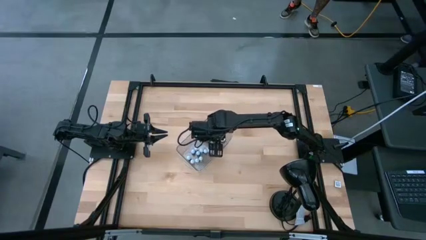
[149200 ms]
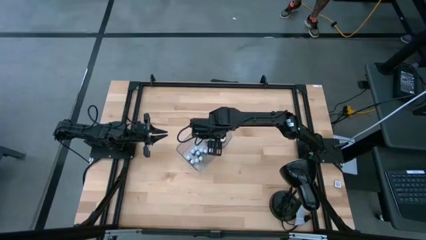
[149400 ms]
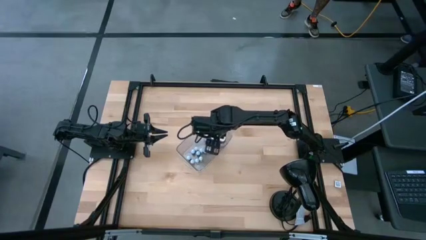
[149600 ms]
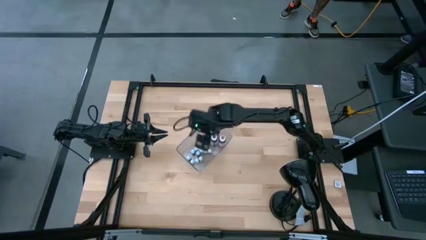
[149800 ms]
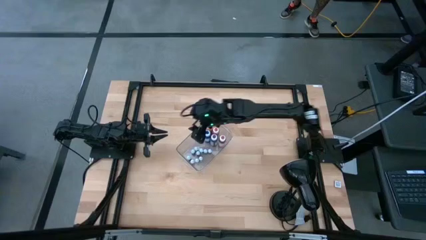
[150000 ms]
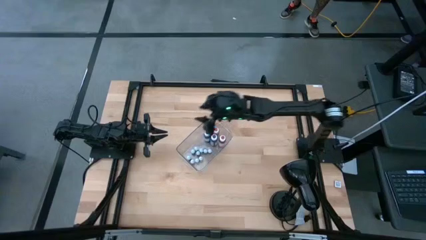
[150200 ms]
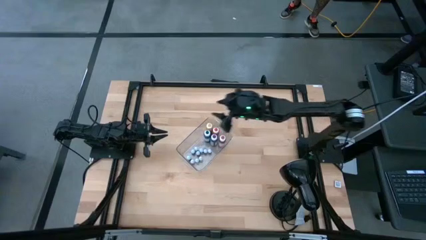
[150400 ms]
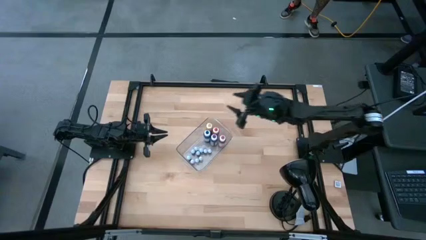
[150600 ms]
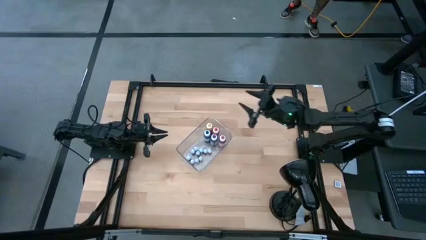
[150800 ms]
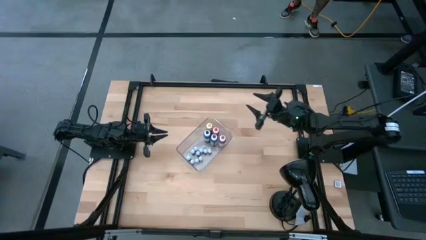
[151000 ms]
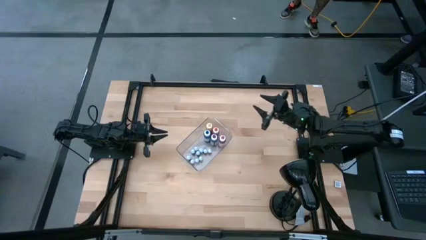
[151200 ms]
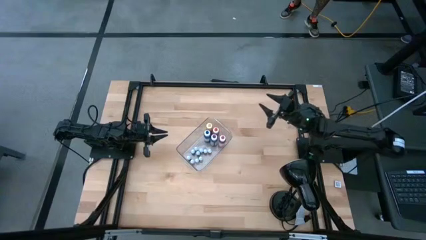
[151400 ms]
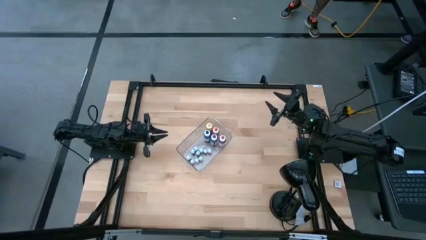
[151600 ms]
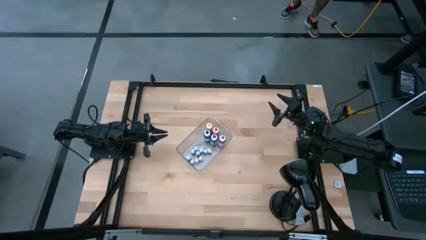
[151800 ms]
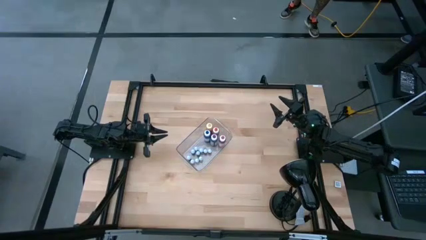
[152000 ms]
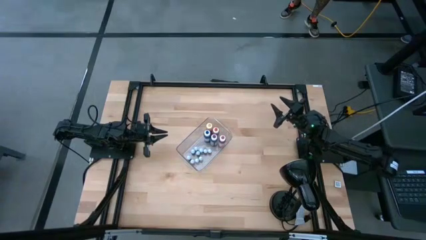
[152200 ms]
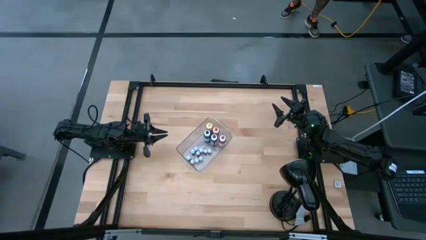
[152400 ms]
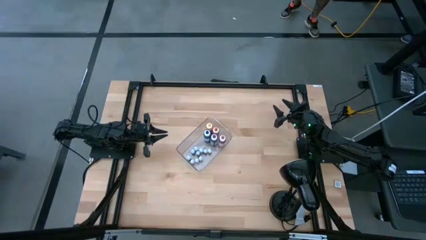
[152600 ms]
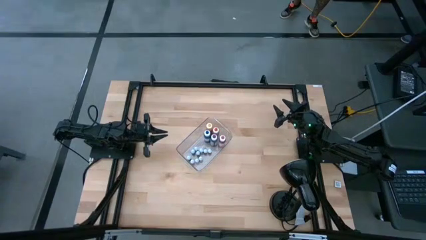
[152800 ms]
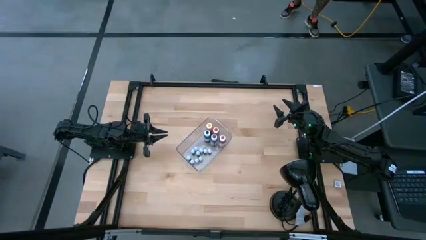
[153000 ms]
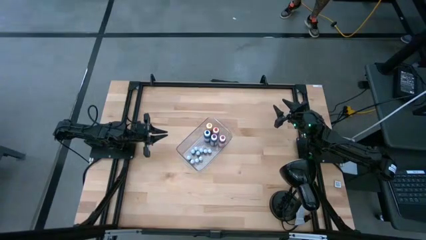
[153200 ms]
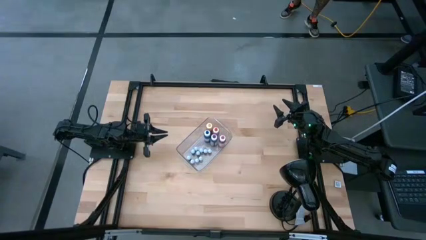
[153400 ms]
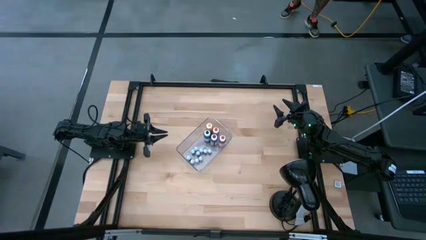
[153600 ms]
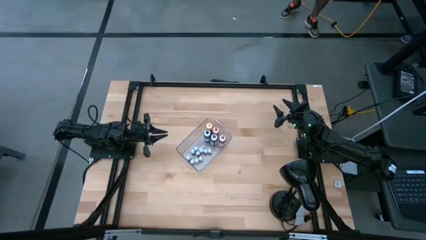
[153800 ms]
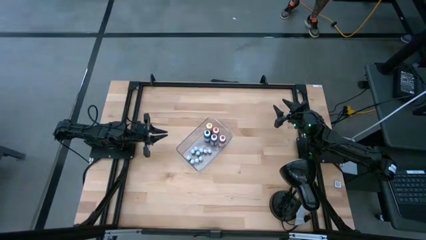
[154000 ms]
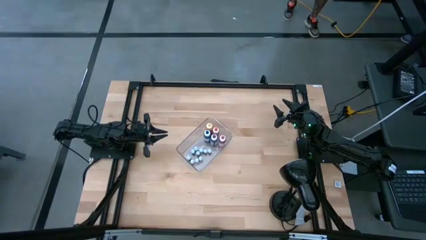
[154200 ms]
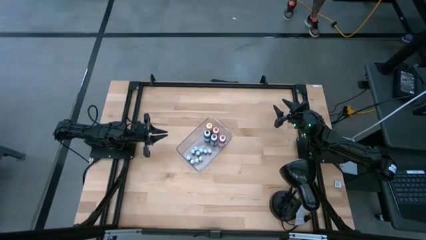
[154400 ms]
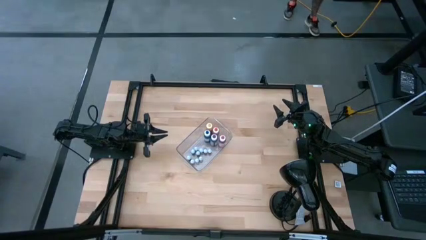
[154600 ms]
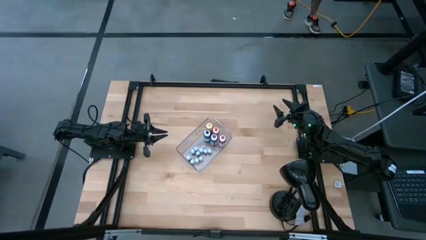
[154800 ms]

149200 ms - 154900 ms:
Task: Pick & Place food coloring
Return to Home Position

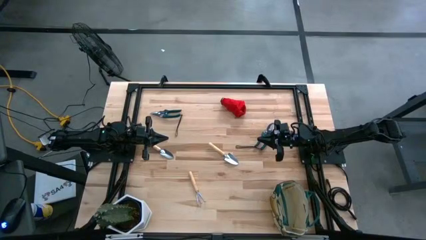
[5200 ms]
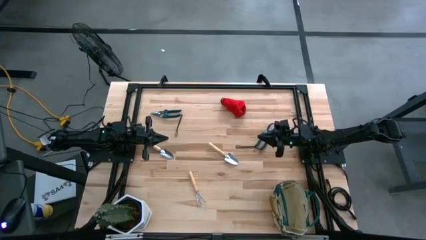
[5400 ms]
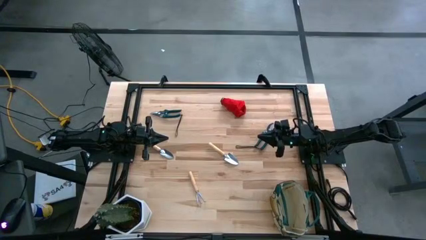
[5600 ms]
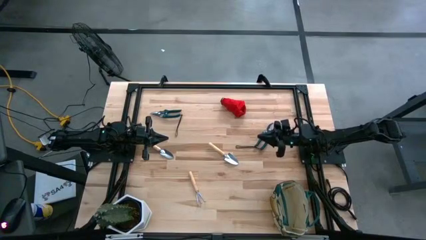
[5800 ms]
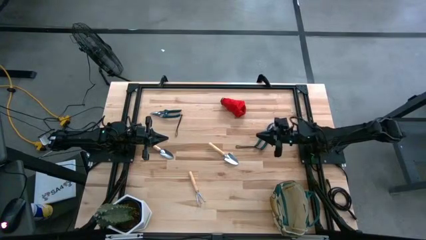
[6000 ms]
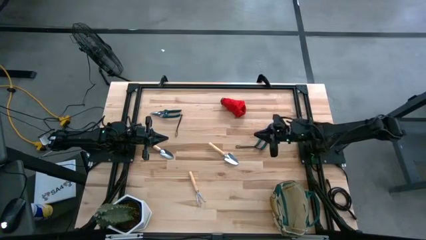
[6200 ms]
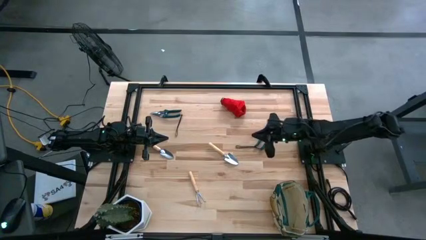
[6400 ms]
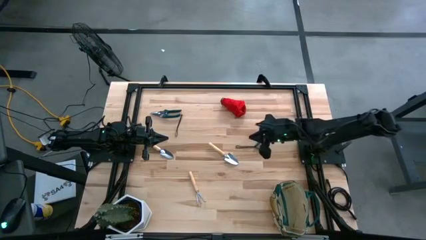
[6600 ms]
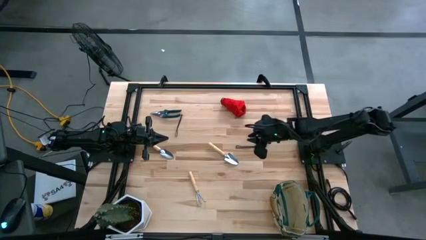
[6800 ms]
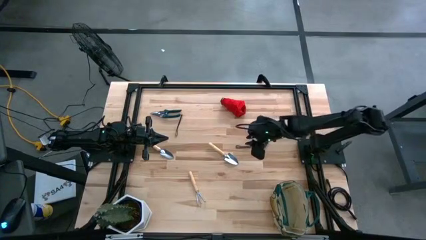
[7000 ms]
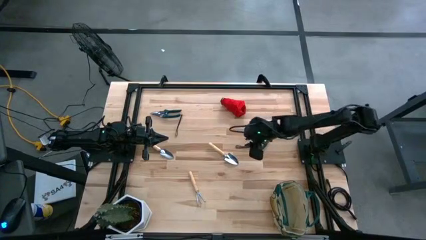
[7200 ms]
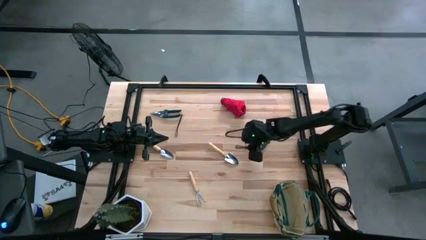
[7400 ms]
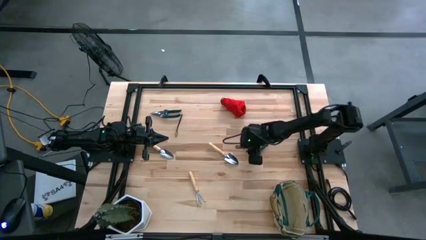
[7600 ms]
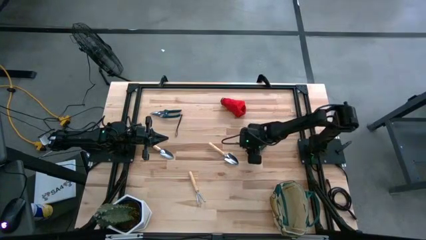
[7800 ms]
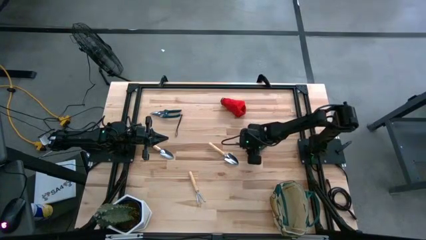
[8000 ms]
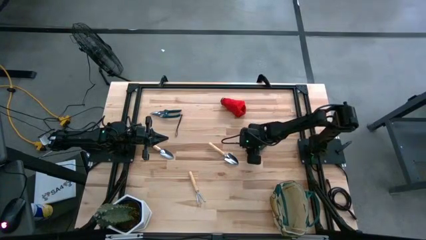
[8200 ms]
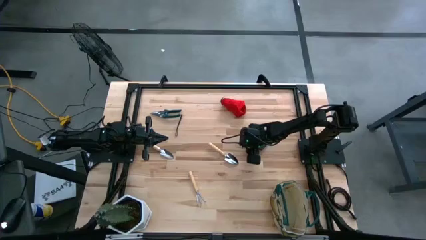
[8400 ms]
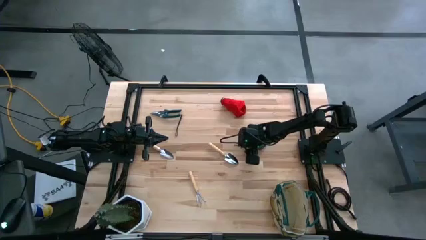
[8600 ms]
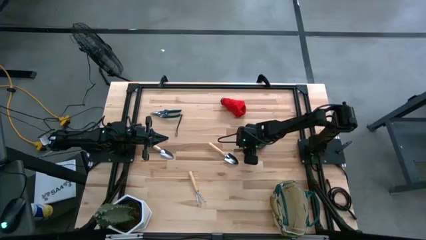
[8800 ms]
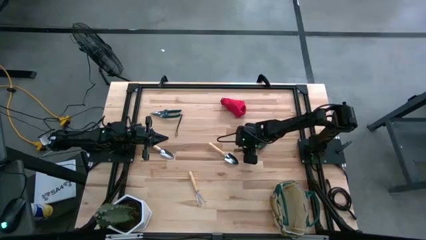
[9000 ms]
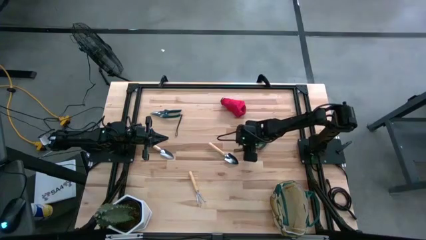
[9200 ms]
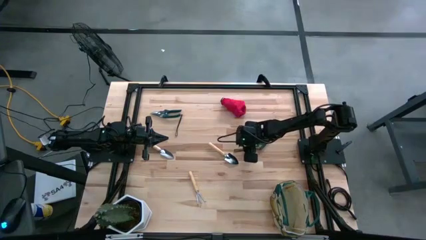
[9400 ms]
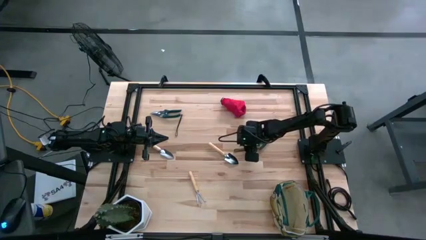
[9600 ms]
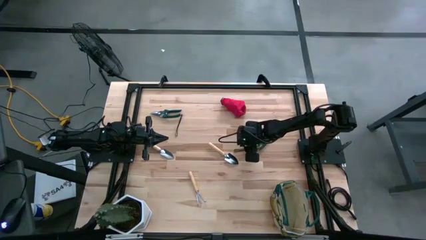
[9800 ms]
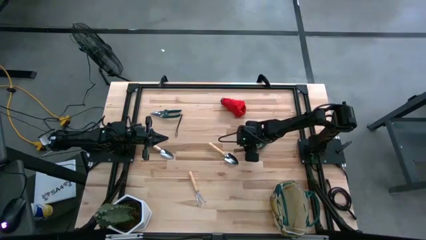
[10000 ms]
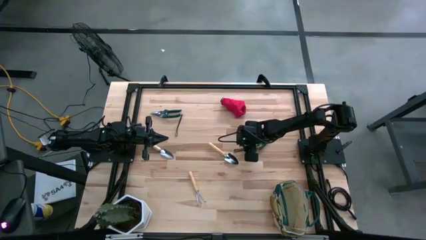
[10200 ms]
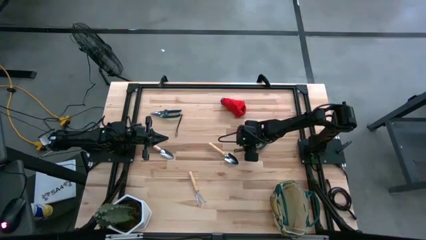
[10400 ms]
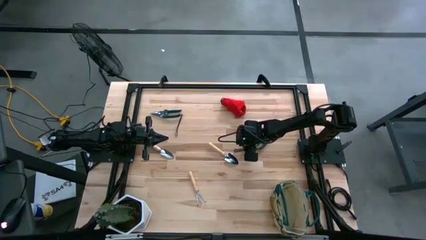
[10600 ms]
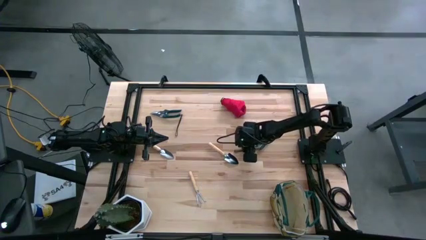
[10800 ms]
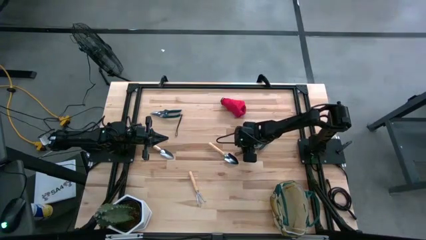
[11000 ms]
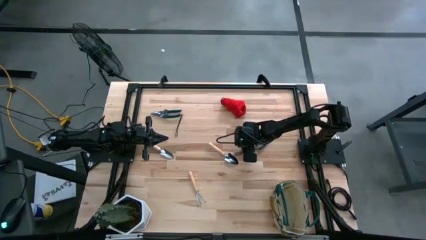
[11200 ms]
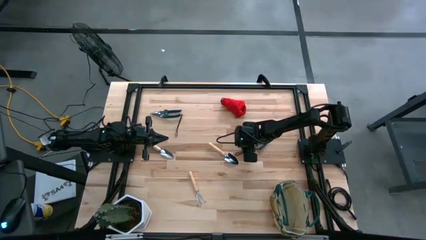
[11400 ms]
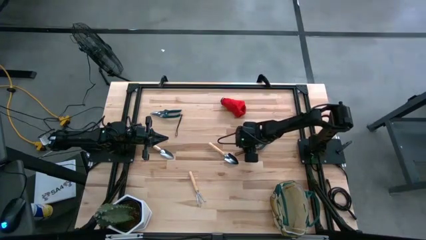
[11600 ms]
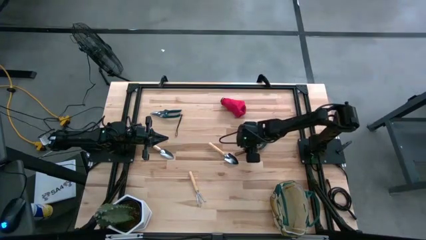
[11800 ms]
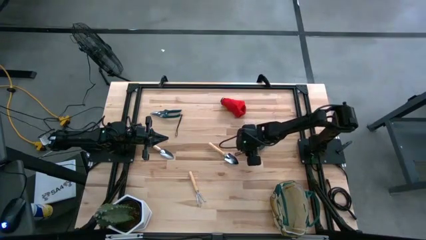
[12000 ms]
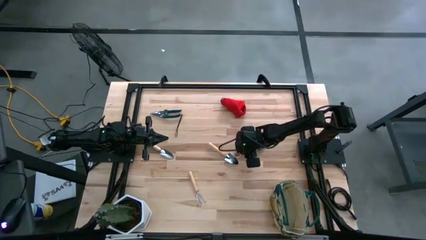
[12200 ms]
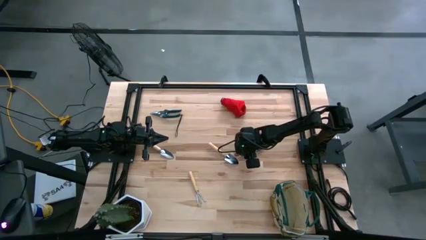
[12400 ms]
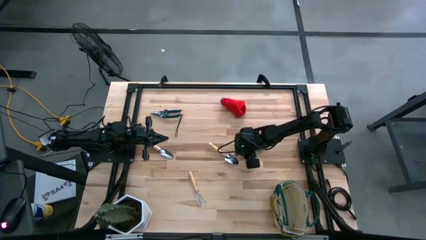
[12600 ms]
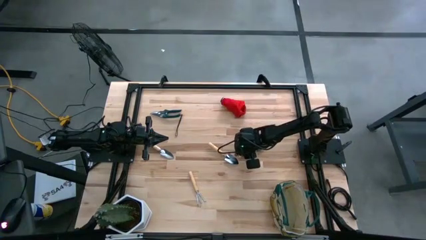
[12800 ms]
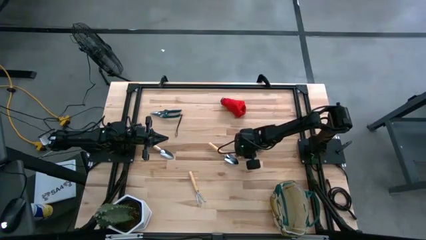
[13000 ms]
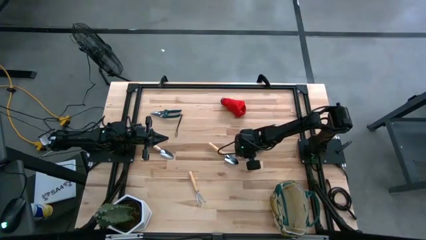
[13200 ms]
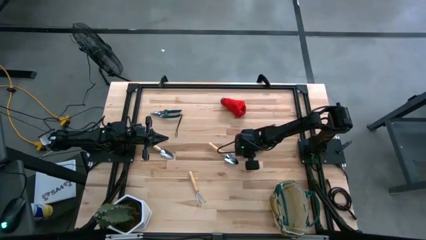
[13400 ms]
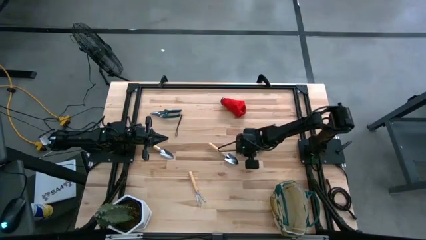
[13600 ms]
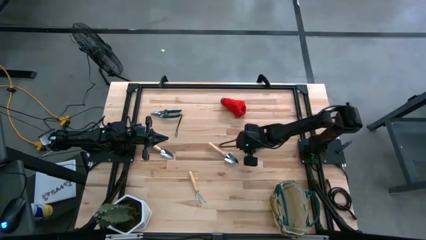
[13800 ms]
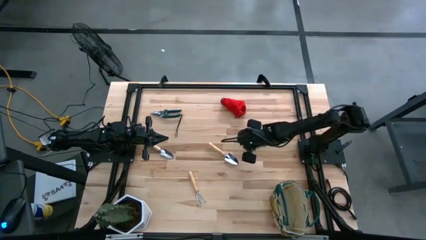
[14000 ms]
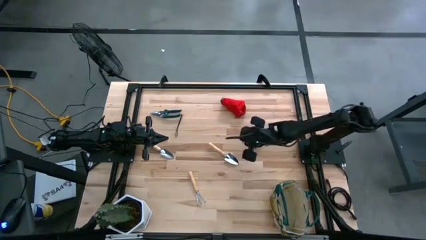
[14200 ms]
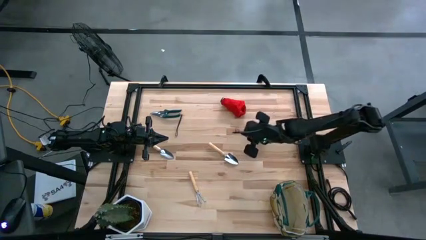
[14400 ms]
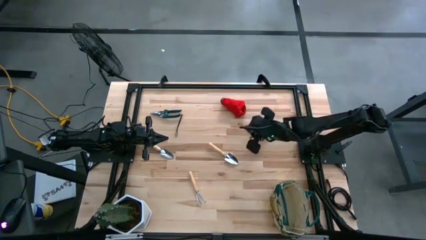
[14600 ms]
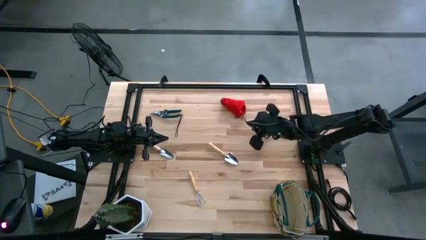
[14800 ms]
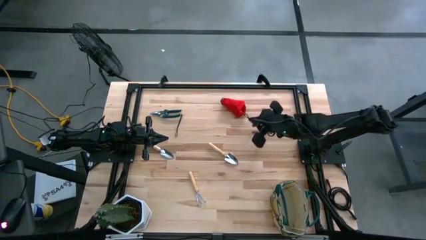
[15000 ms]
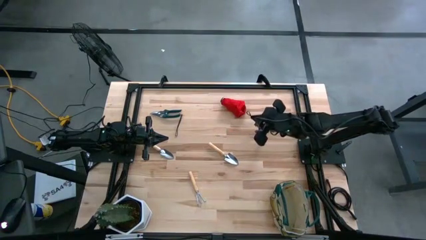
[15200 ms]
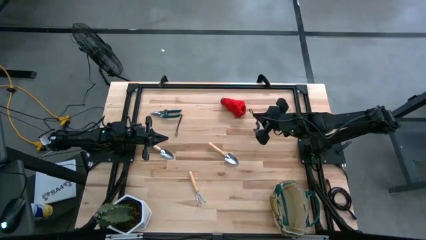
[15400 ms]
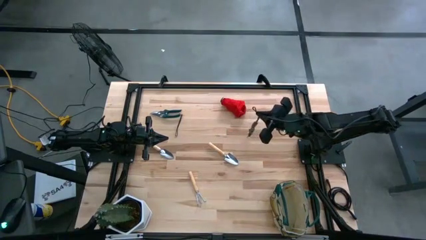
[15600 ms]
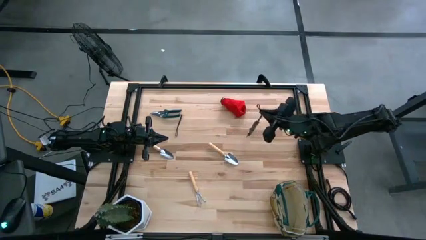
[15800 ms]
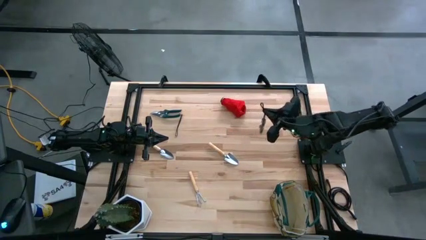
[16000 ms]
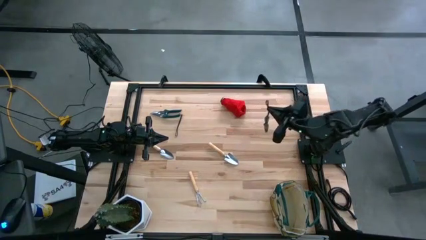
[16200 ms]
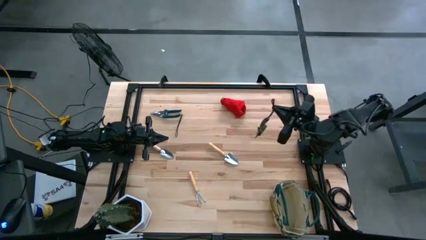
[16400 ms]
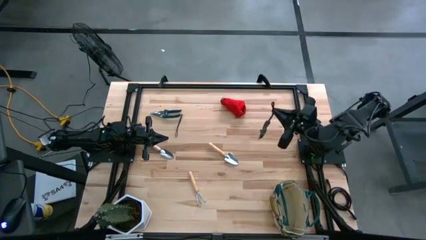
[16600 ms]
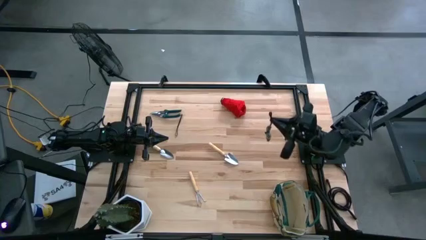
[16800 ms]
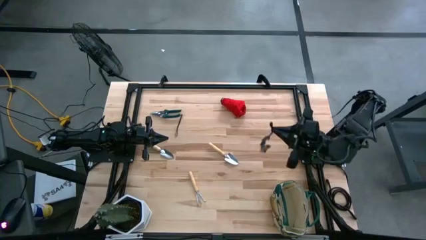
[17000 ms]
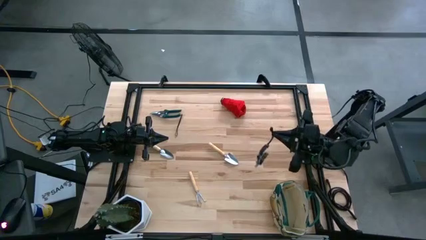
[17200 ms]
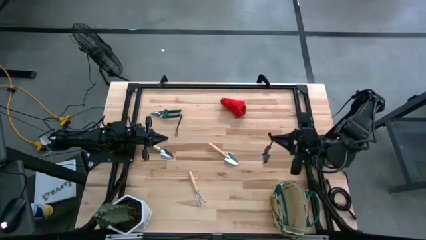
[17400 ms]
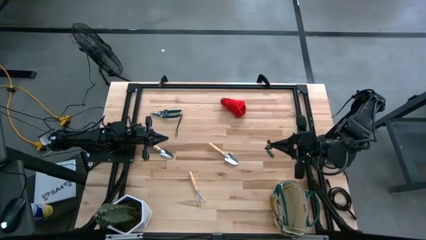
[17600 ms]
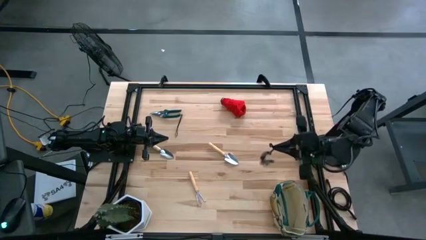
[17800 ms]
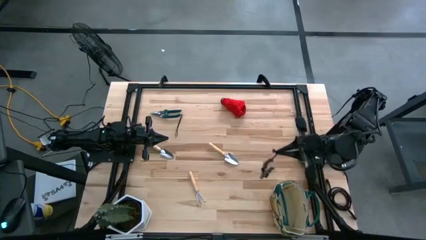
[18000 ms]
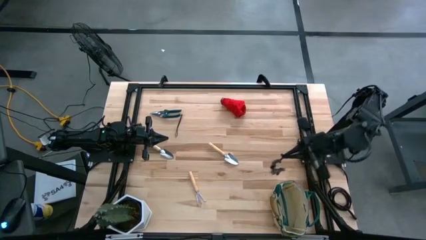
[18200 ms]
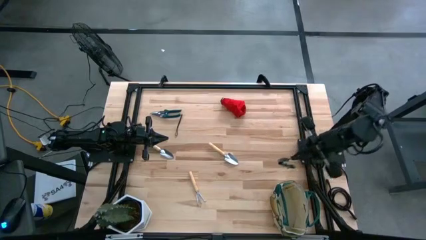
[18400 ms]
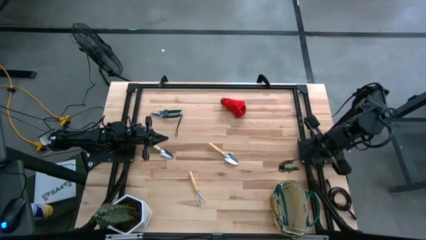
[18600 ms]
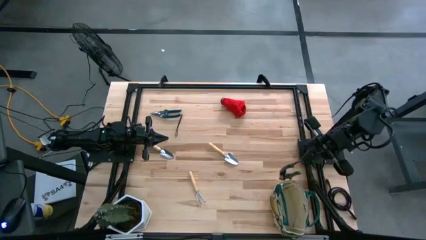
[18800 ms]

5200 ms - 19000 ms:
Task: Pick & Place Garden tools in Gardening bag
Put the right green shear scissors into the gardening bag
